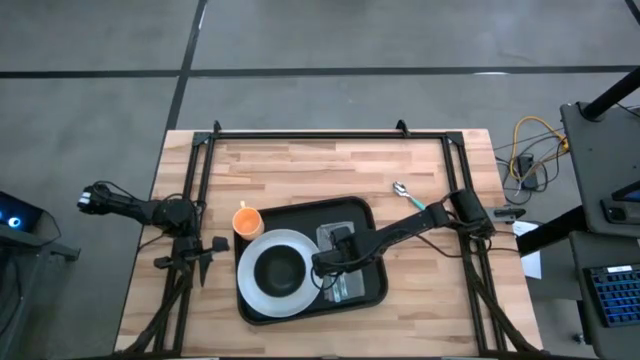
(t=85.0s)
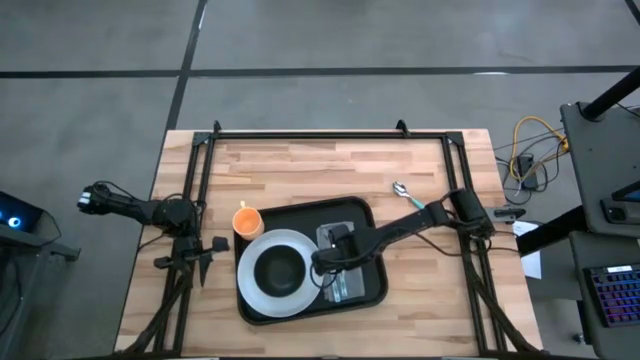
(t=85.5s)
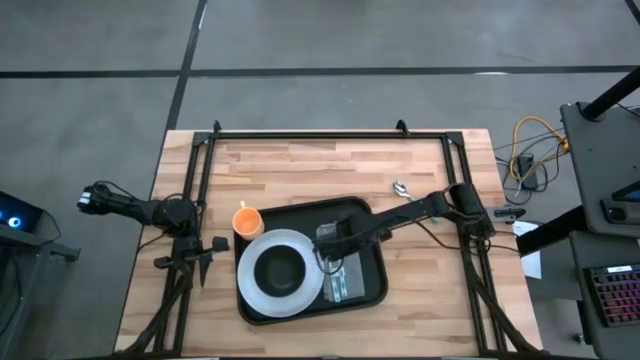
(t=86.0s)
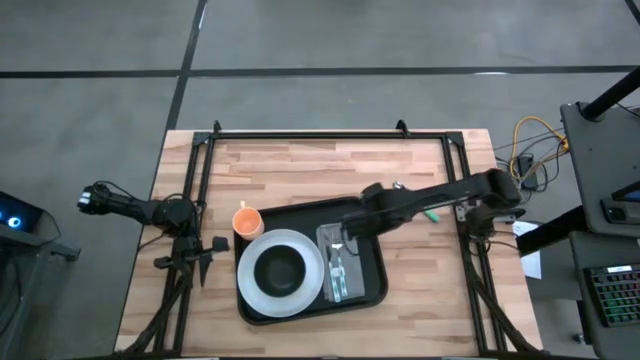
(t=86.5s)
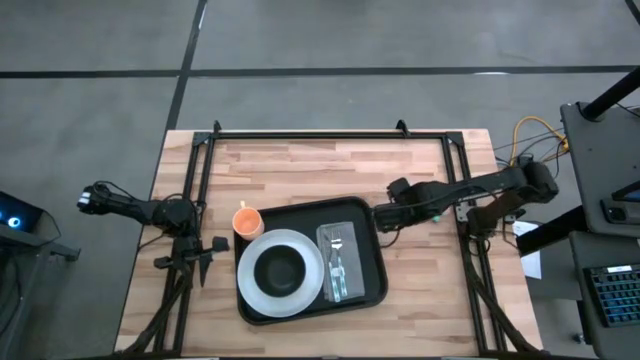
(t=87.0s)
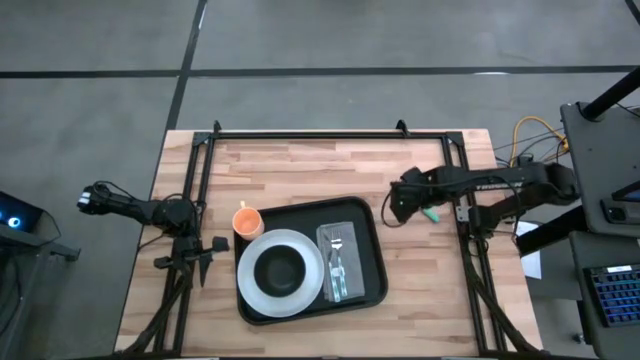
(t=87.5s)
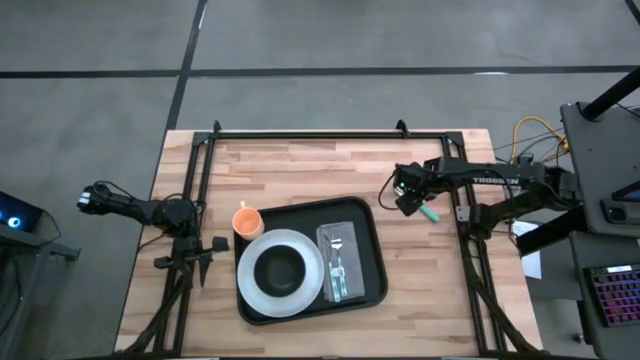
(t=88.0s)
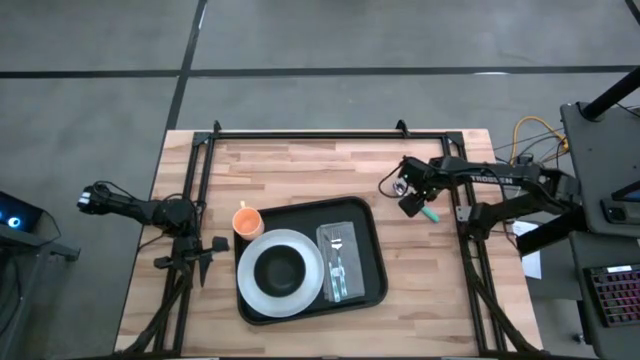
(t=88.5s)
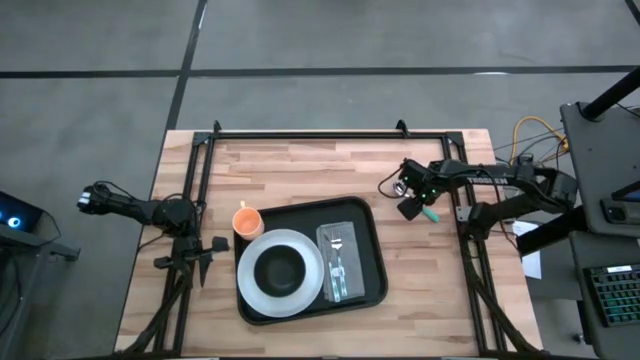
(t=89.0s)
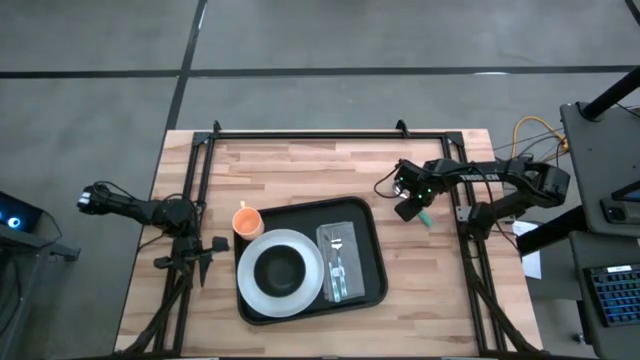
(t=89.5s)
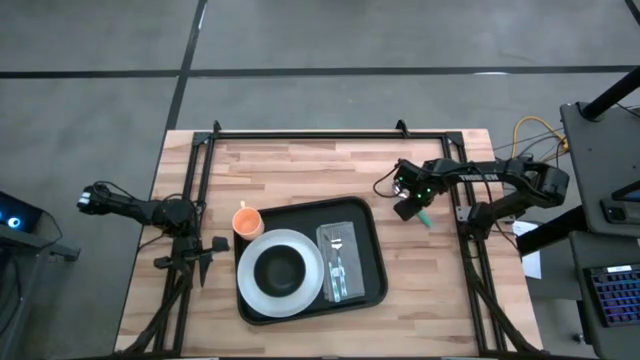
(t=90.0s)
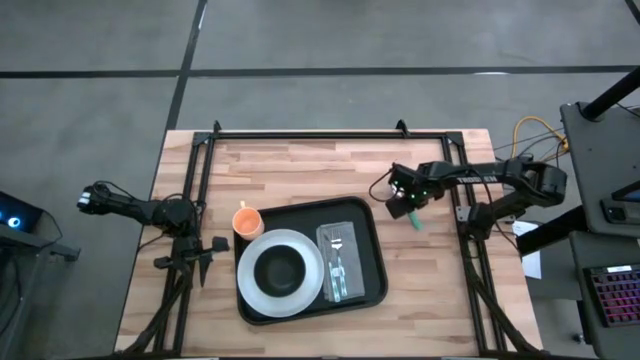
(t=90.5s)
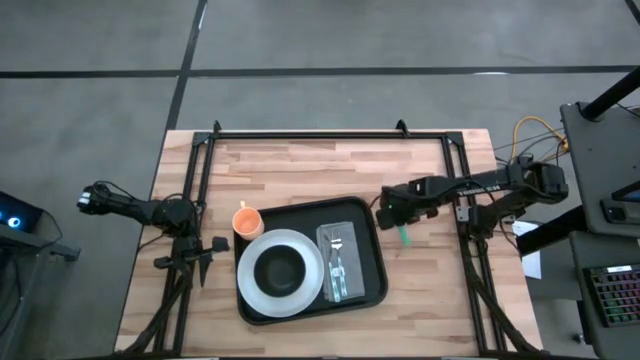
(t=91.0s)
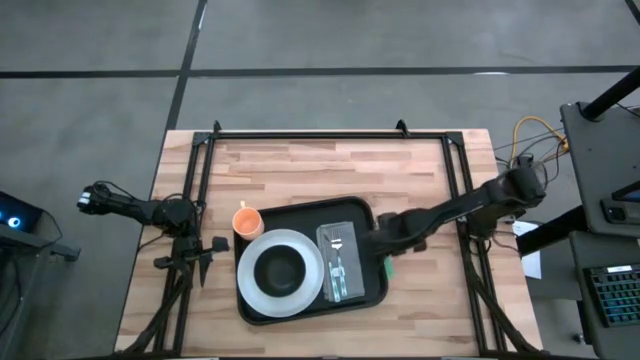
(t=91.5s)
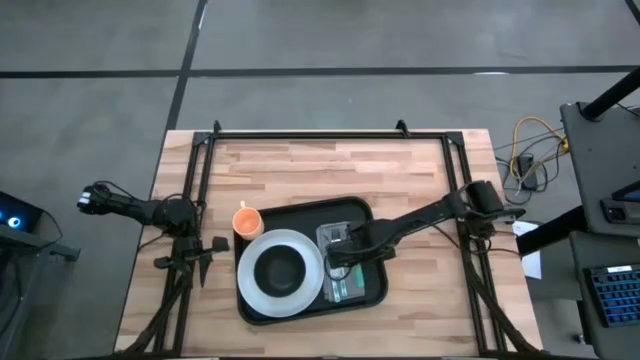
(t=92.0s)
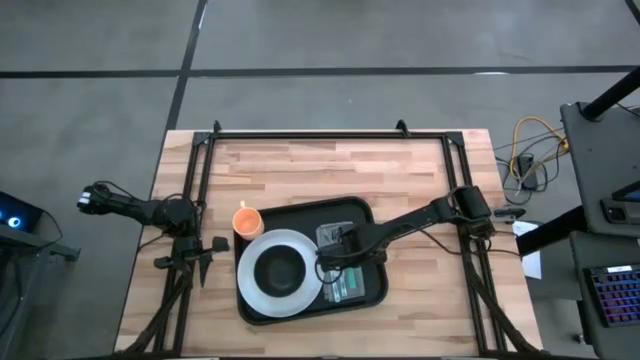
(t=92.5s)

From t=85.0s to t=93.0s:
Task: Set up tray
Put the light blue spoon to the right of blue fork on the black table tray

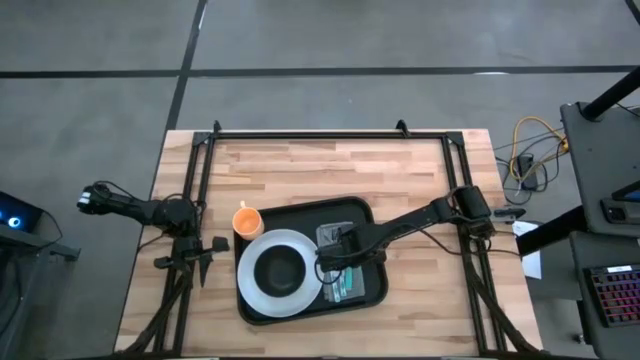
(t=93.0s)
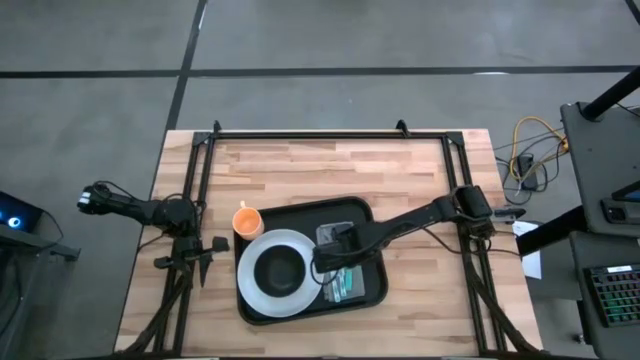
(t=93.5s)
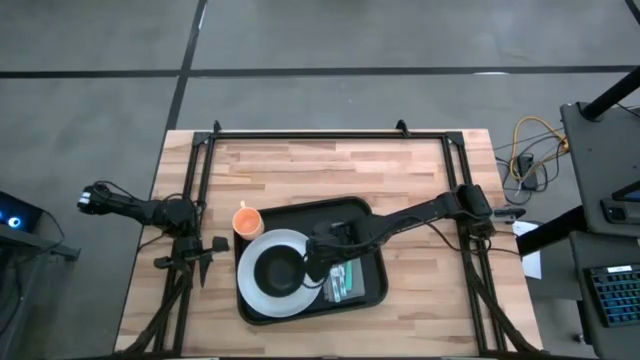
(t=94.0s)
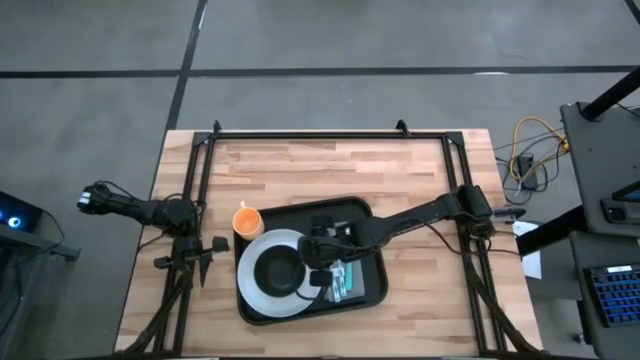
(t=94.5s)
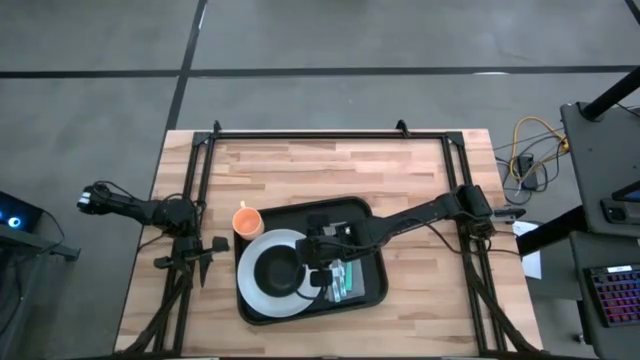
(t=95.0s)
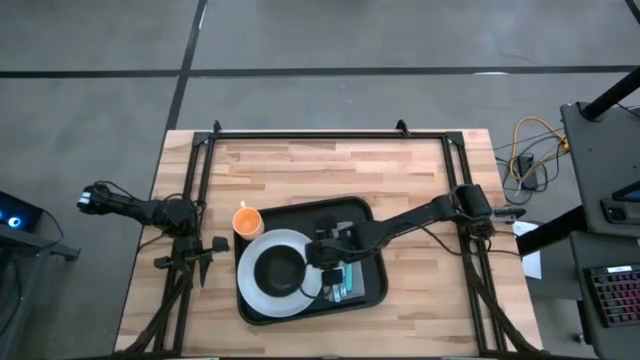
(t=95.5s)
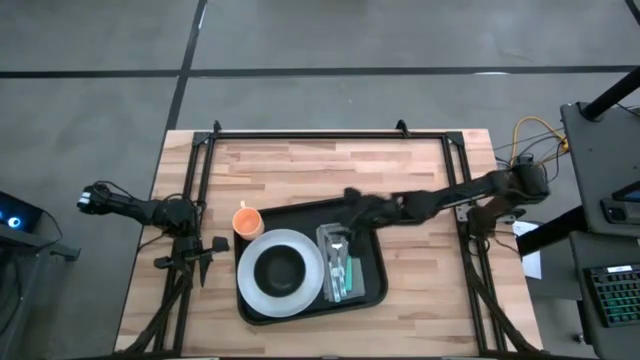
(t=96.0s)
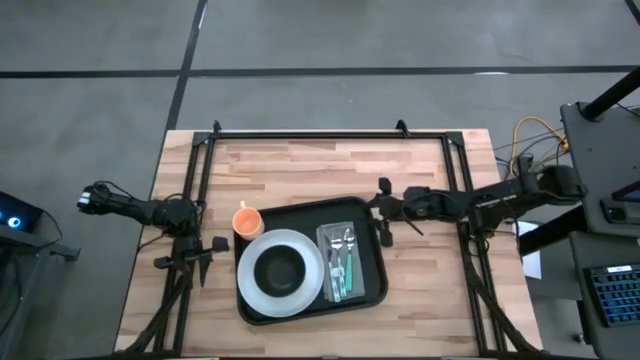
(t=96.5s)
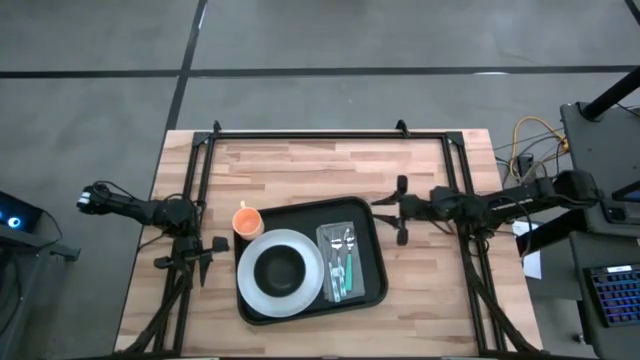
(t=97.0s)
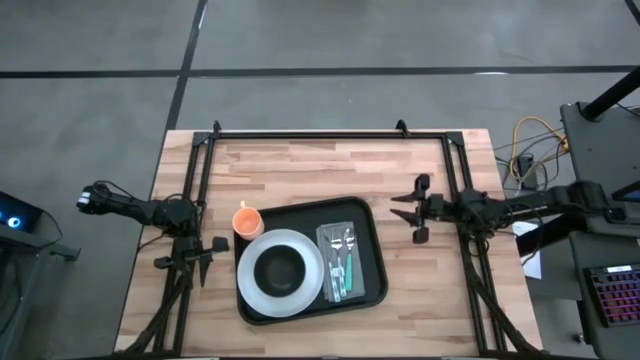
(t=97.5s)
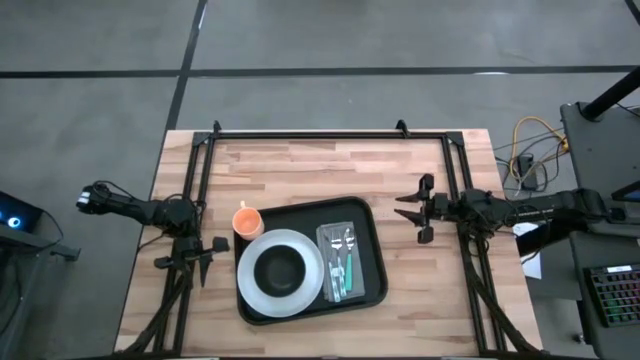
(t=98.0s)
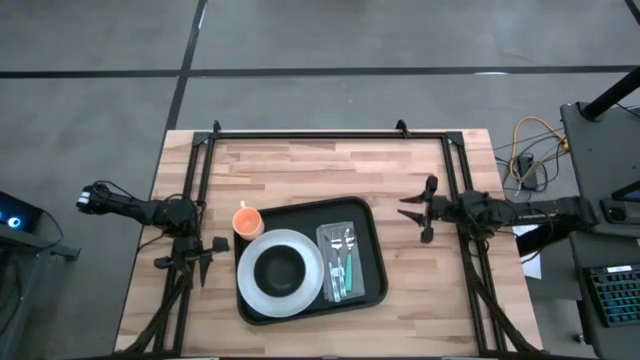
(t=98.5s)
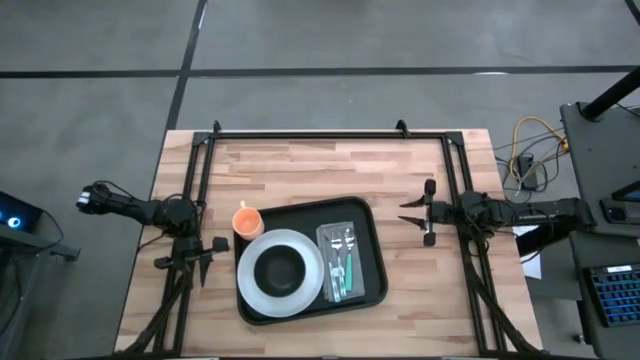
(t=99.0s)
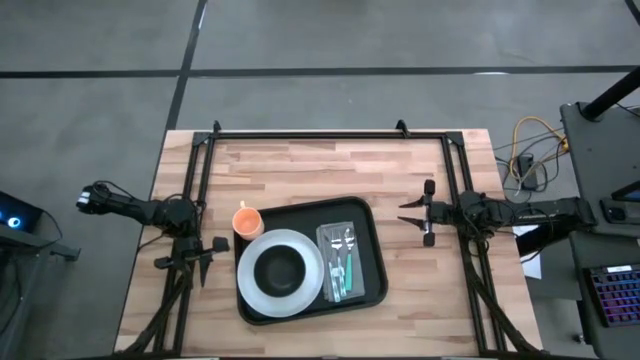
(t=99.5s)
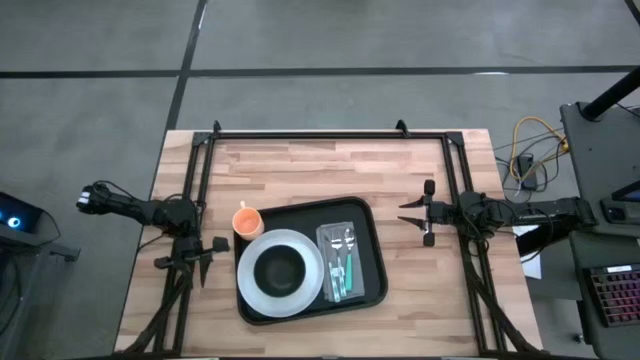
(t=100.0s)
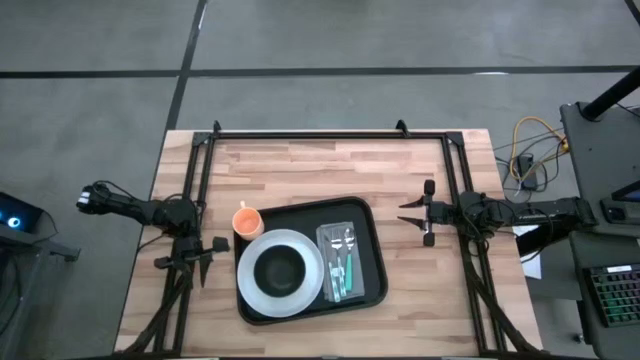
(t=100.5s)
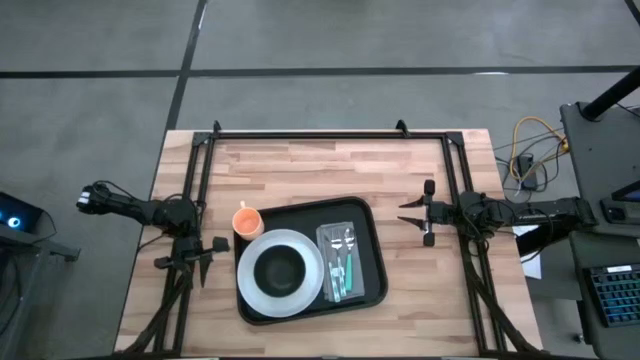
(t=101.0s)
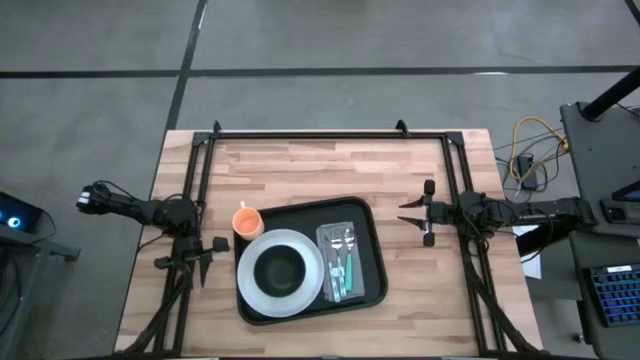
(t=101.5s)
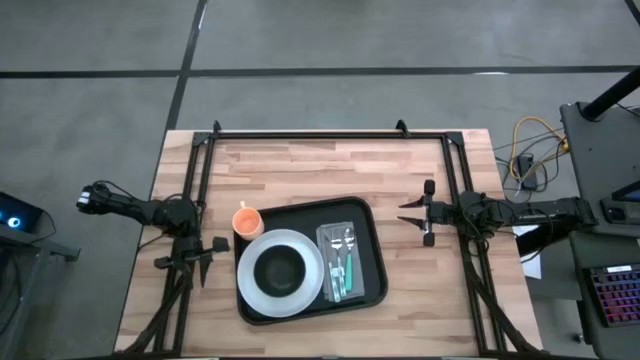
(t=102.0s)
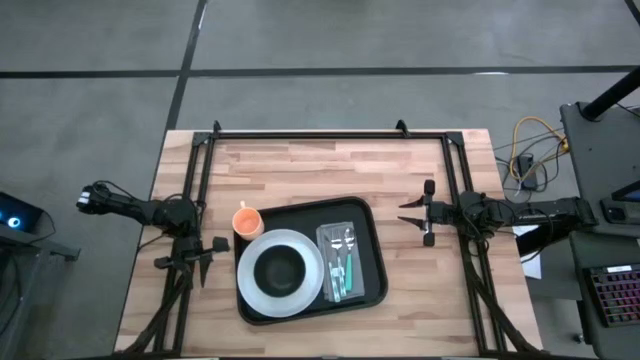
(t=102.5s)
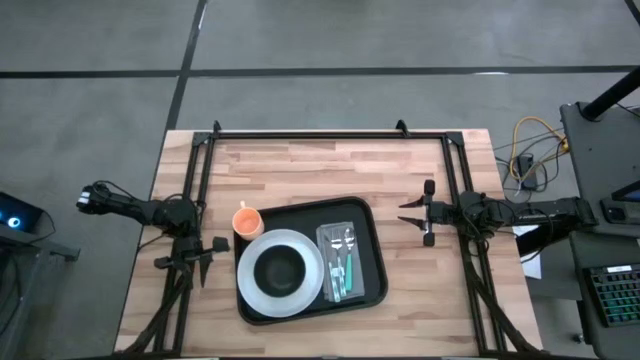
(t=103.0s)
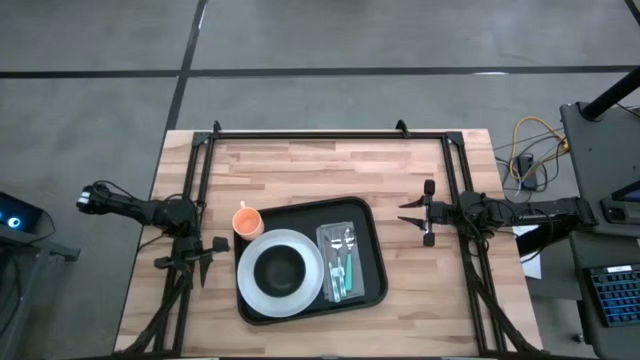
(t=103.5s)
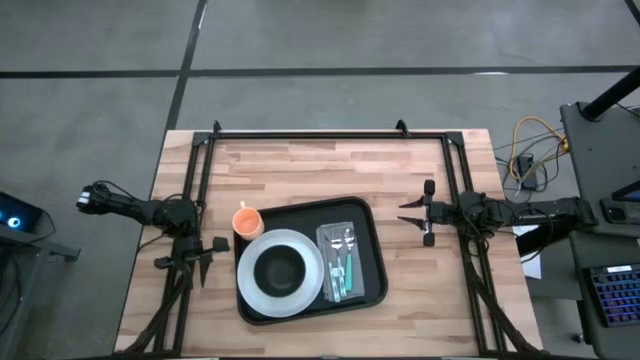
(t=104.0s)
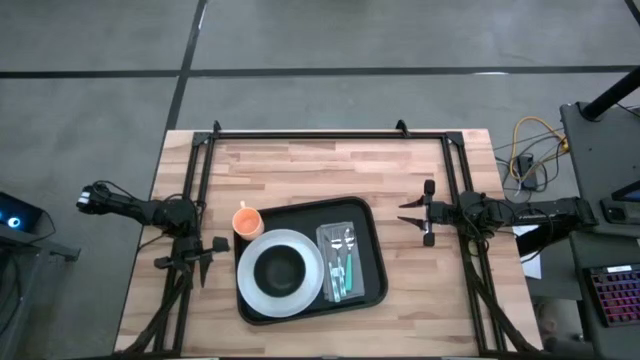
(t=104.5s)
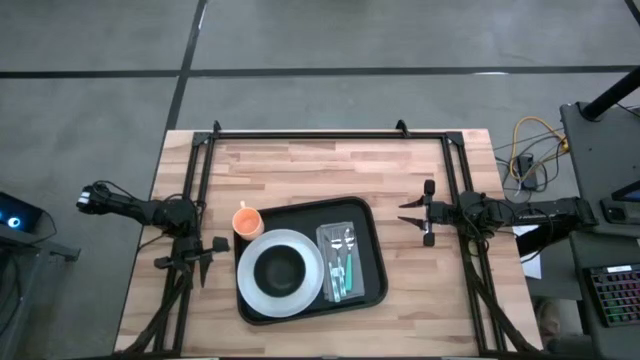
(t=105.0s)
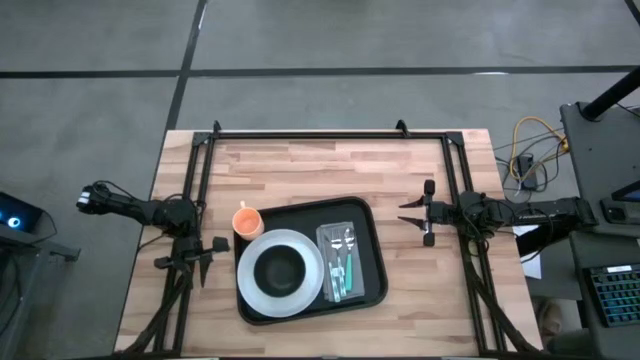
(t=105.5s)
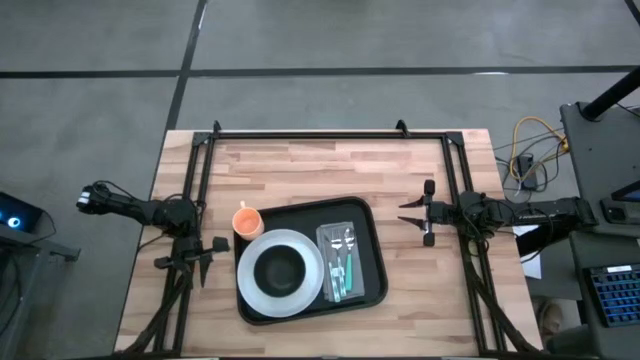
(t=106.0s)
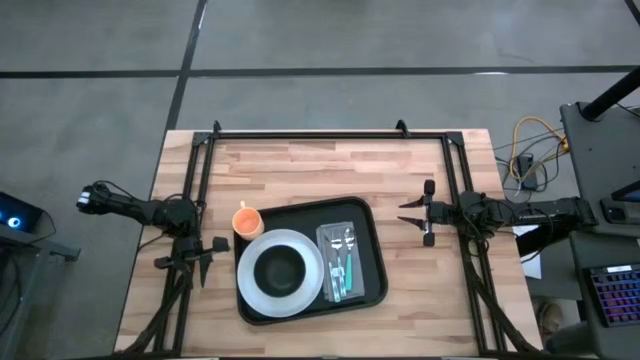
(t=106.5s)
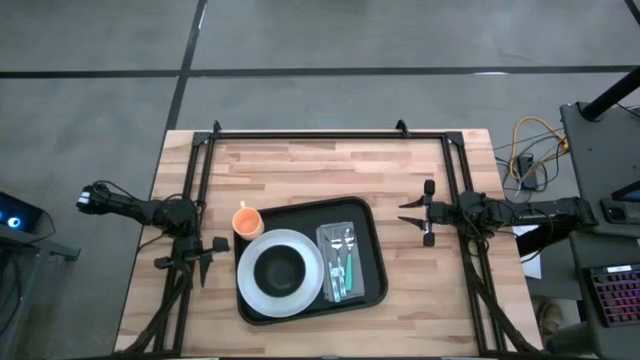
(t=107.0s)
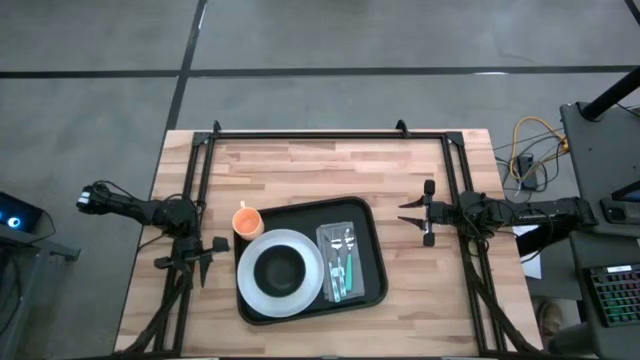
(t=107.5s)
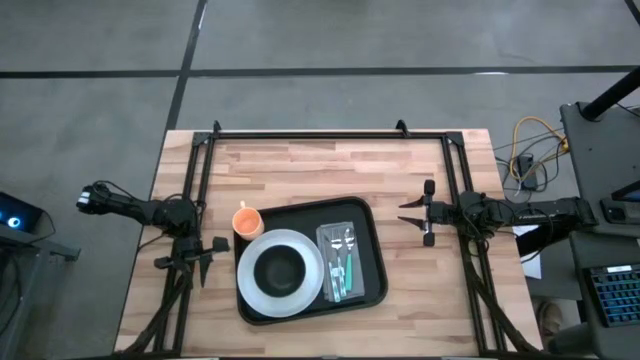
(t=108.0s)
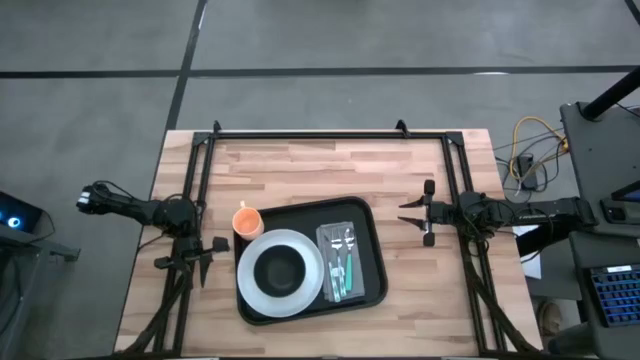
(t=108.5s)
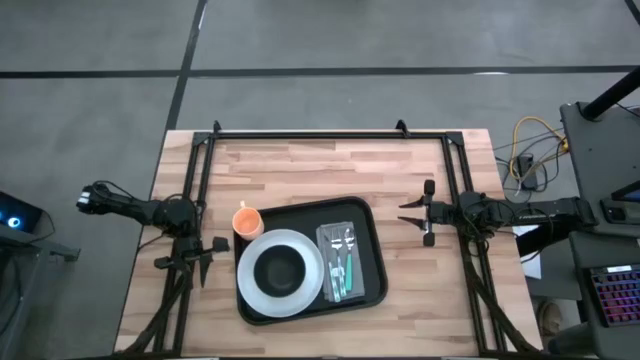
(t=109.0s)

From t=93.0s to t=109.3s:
Return to Home Position
